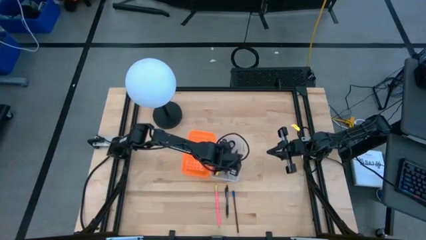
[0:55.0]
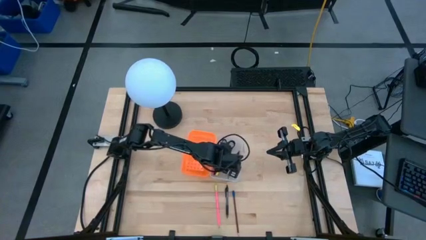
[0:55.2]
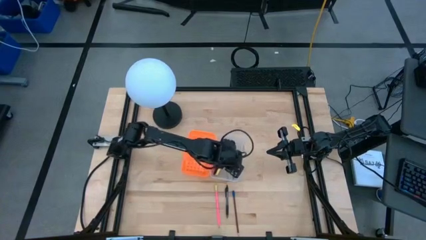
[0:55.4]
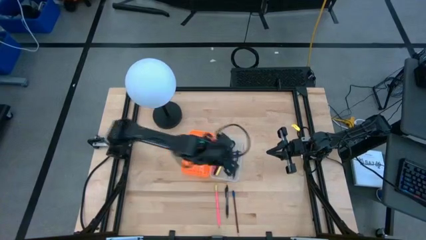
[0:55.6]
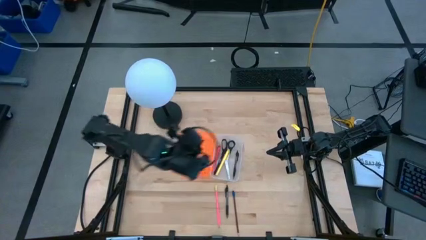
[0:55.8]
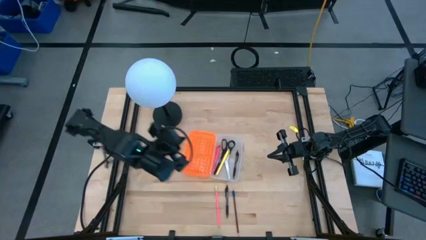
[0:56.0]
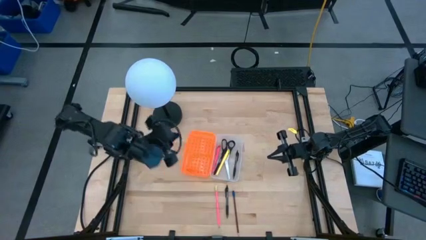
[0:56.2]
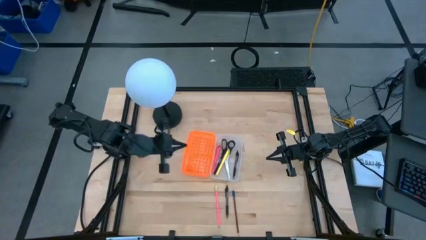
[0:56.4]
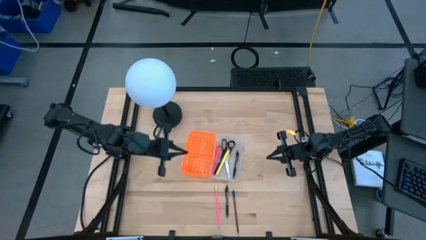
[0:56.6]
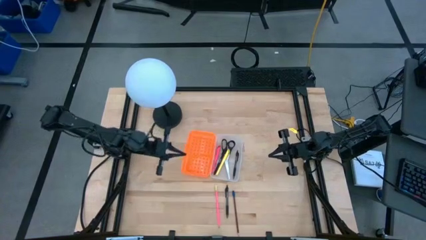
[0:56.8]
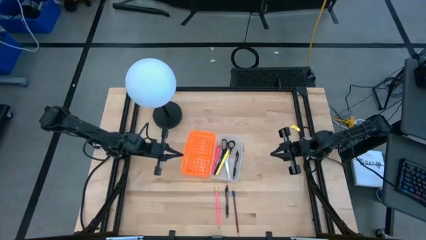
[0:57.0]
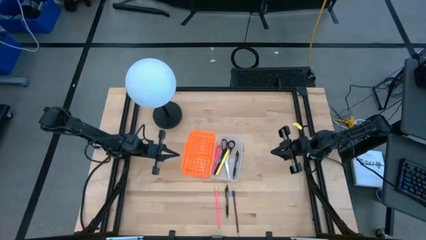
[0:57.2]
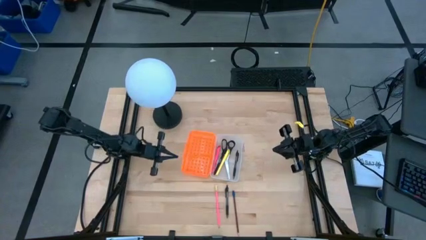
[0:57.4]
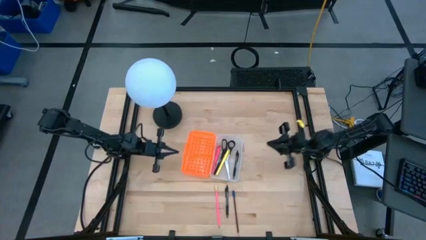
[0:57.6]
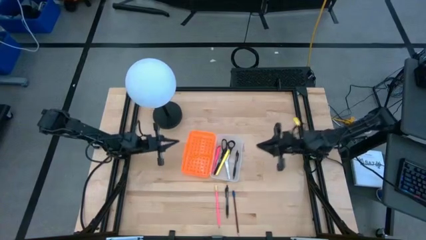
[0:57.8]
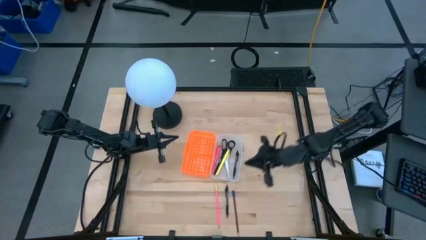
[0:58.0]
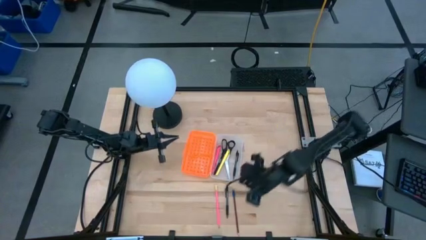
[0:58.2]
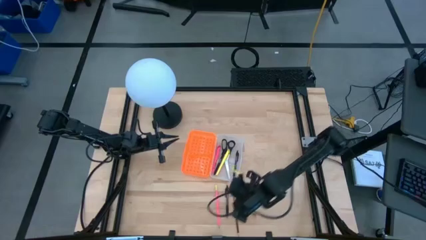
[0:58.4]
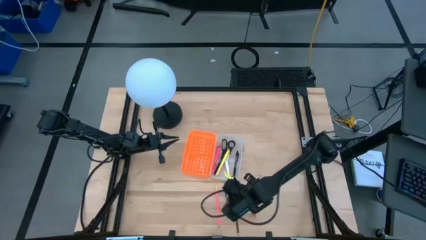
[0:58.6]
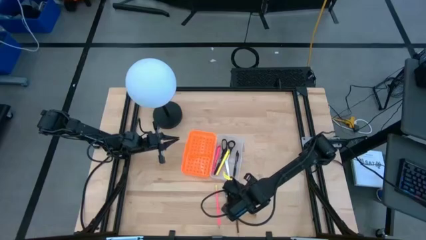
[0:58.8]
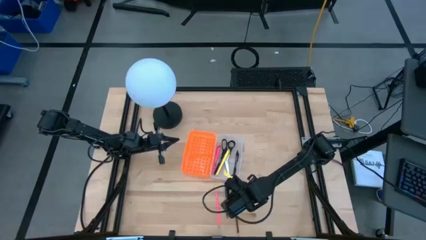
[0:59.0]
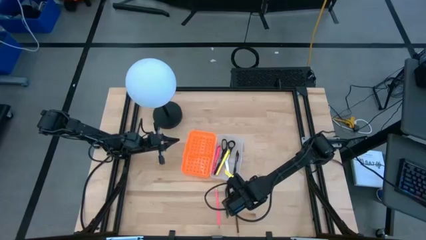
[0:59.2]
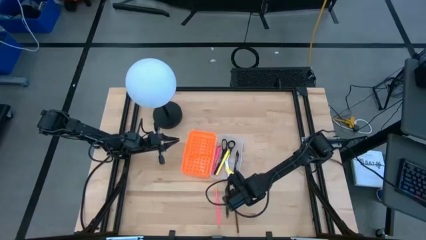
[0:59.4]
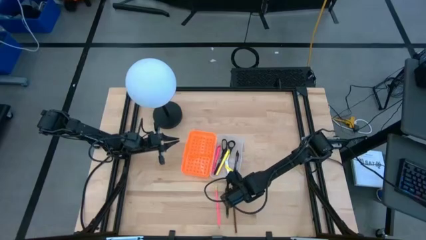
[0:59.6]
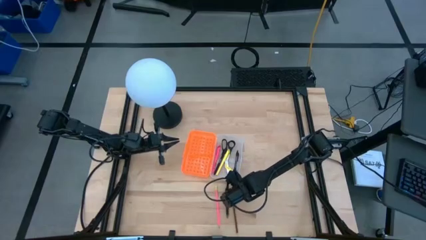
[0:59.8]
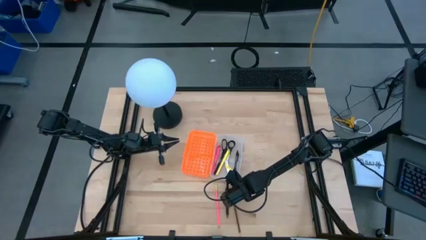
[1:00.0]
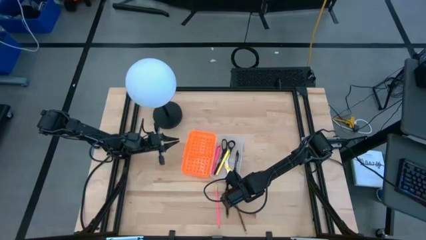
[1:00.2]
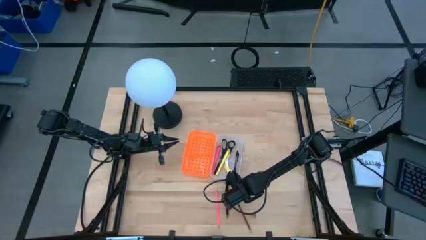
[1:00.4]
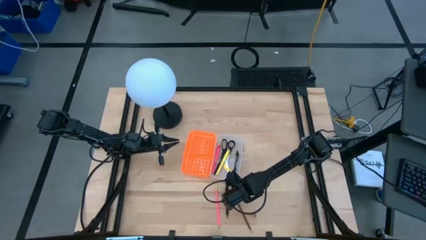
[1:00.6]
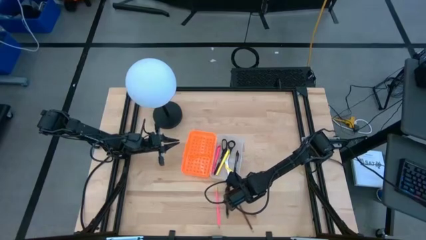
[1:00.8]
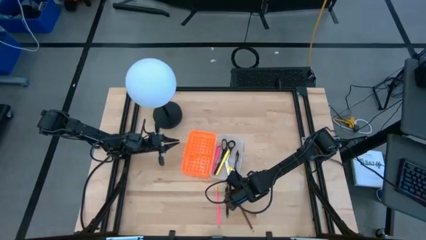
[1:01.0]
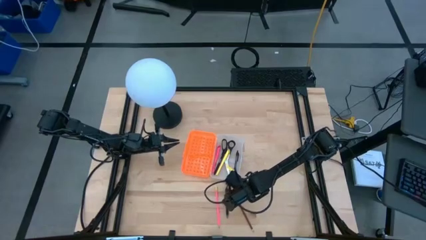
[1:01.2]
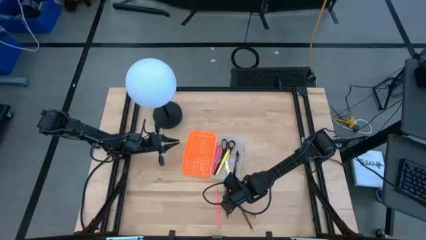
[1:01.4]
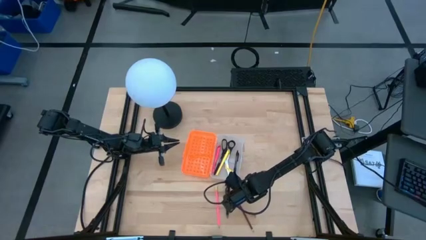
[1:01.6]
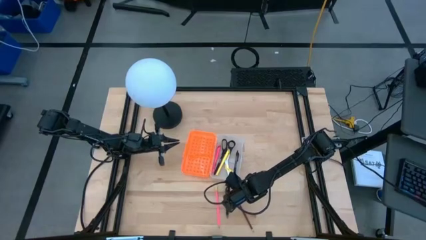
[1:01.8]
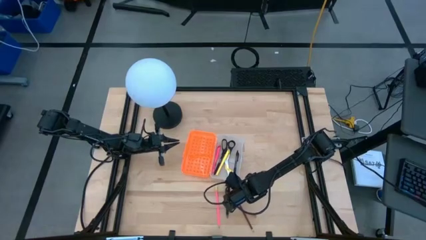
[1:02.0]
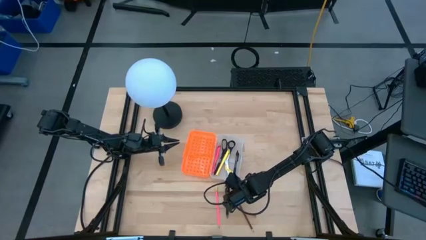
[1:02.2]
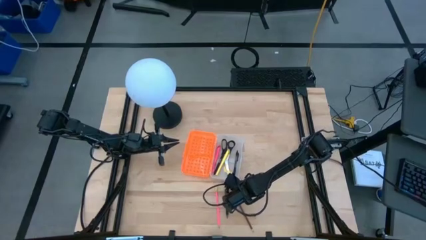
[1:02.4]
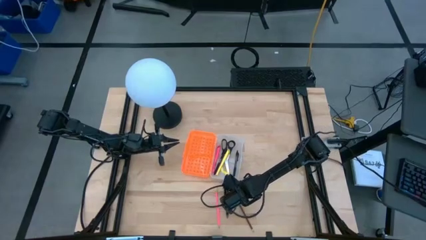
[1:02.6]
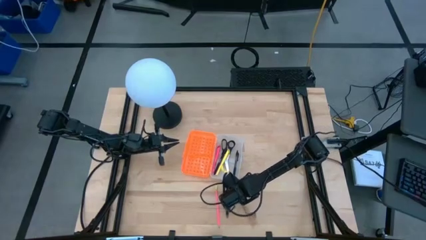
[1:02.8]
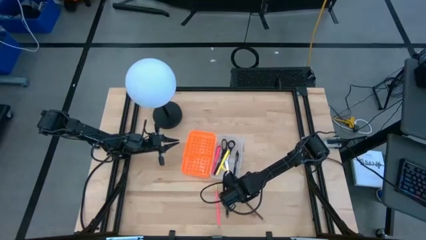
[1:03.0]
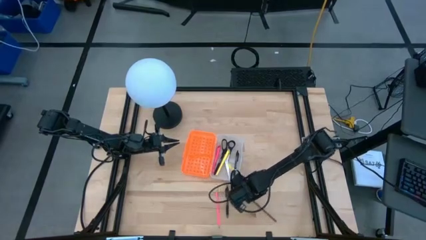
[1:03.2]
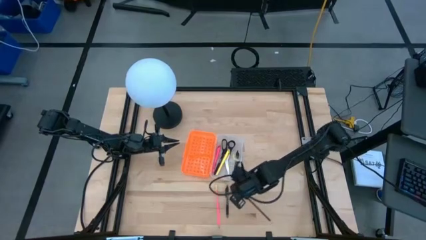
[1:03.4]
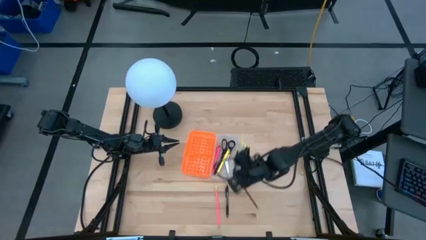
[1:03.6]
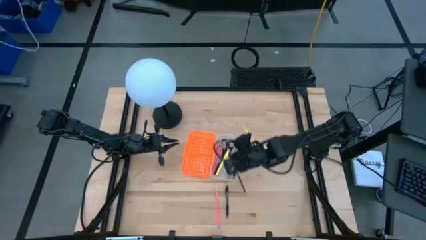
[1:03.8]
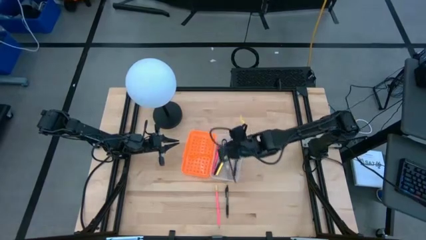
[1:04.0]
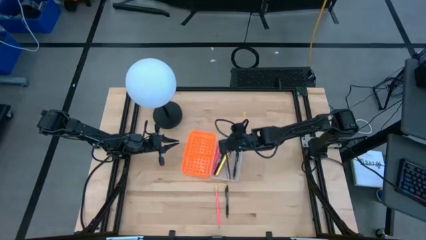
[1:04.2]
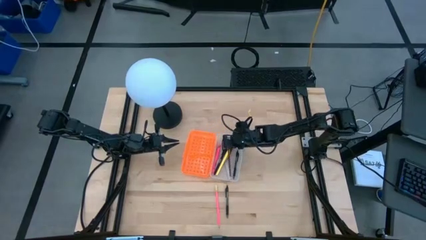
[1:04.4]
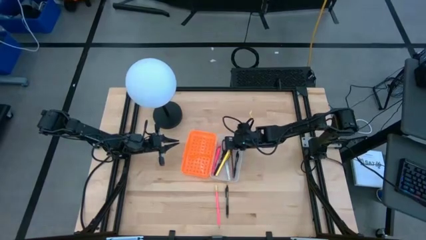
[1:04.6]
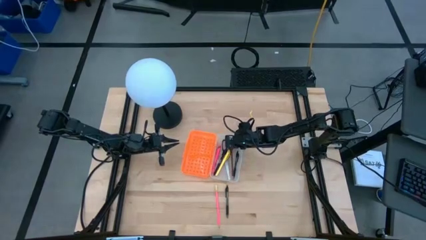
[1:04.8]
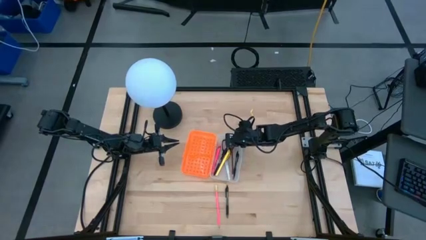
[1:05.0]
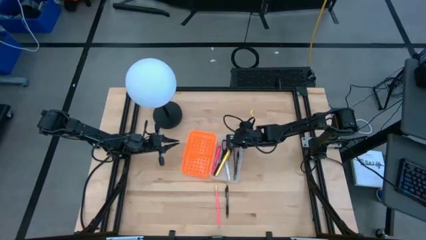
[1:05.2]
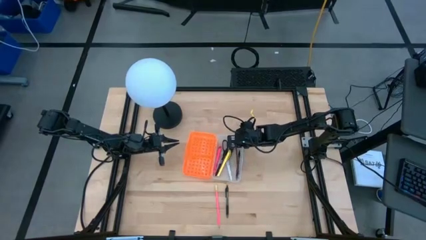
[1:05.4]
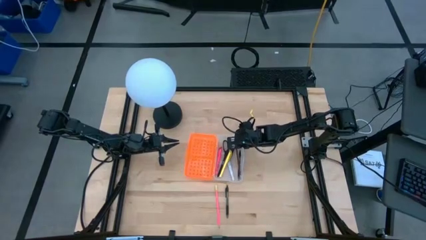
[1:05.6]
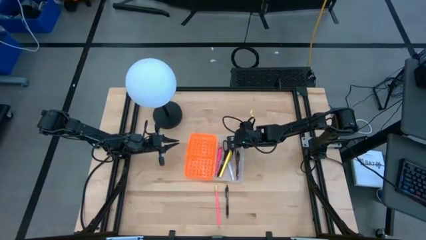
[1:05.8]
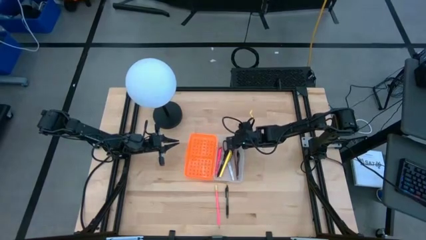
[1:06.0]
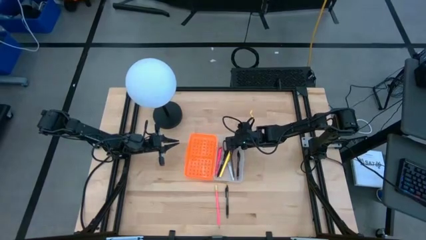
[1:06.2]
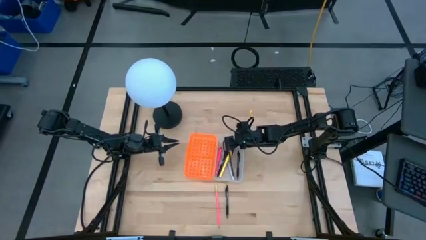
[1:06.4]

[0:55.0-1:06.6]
Task: Pick & place school supplies into a supply box
Put the brown pencil into the orange supply box

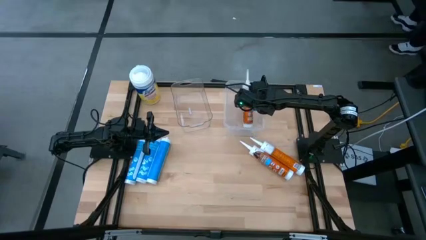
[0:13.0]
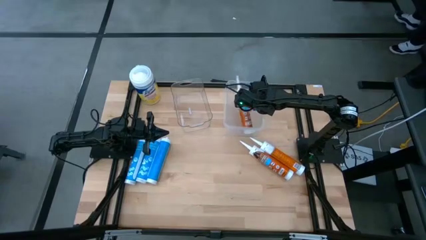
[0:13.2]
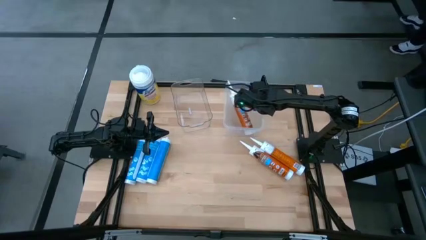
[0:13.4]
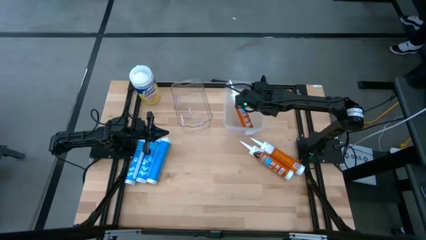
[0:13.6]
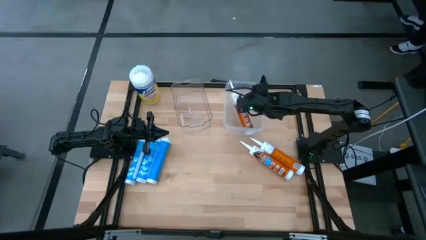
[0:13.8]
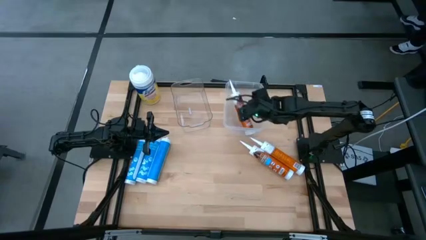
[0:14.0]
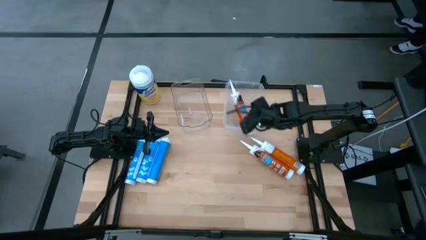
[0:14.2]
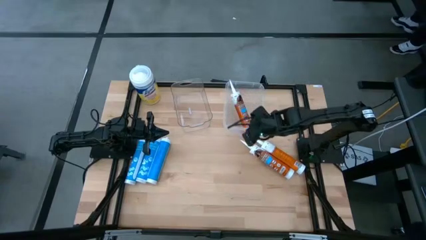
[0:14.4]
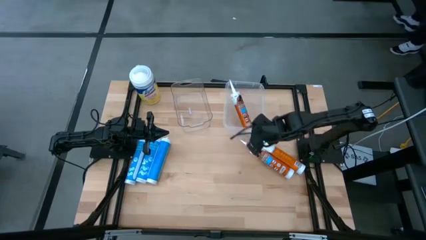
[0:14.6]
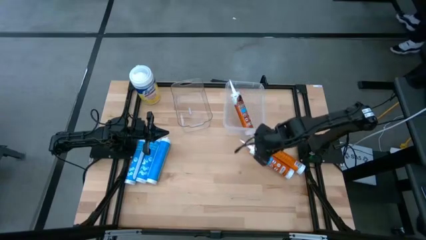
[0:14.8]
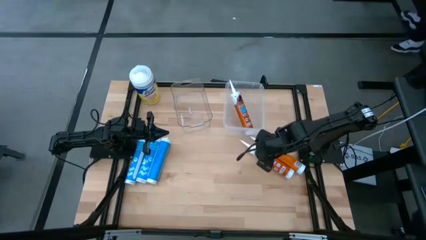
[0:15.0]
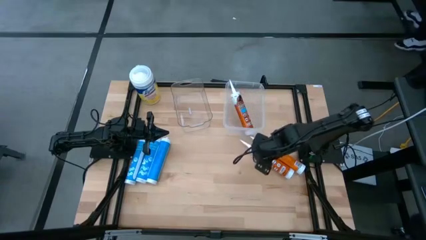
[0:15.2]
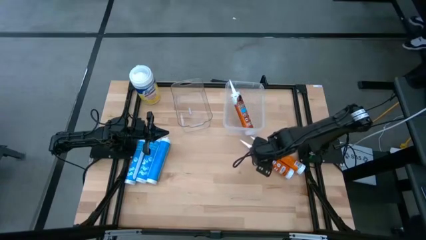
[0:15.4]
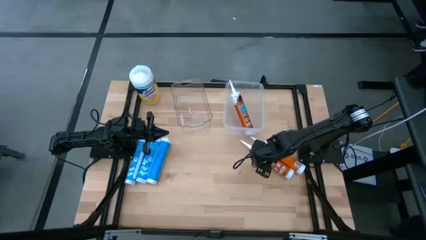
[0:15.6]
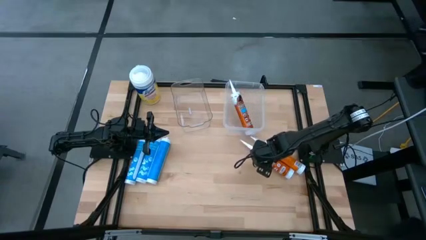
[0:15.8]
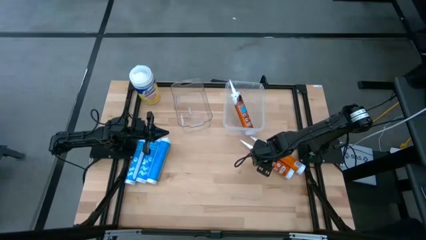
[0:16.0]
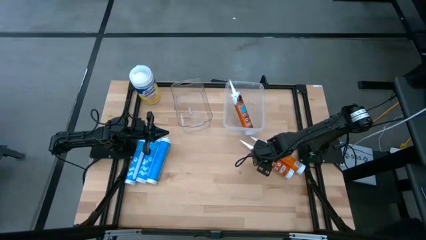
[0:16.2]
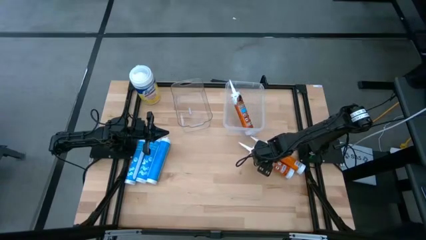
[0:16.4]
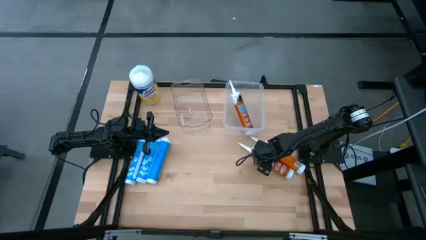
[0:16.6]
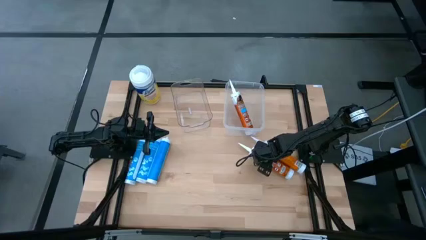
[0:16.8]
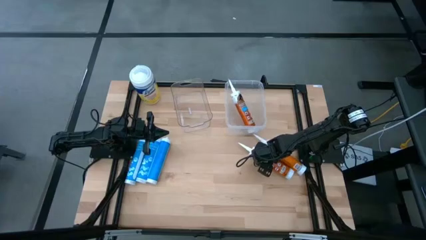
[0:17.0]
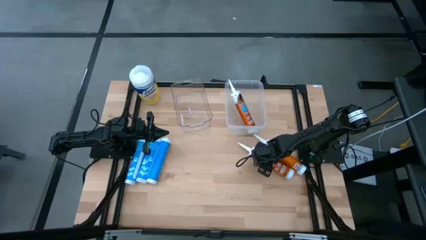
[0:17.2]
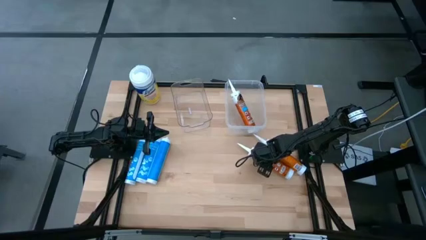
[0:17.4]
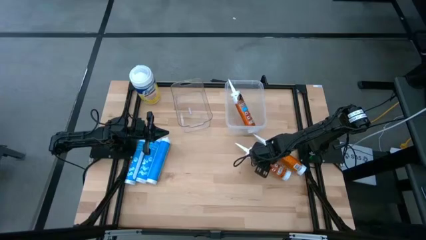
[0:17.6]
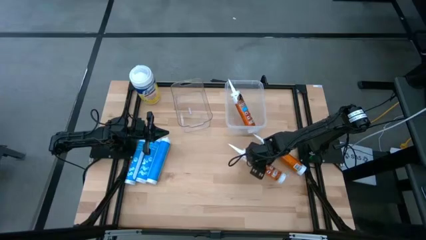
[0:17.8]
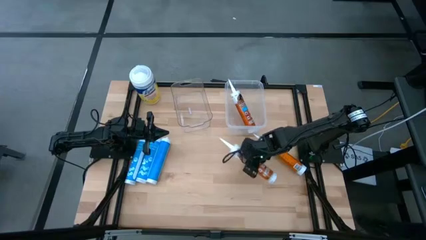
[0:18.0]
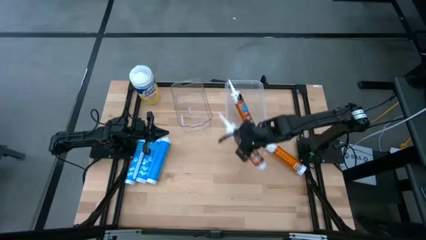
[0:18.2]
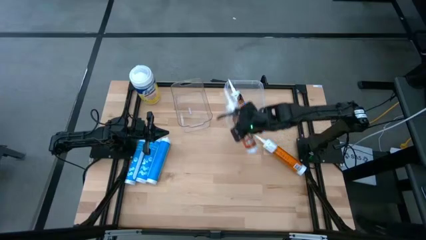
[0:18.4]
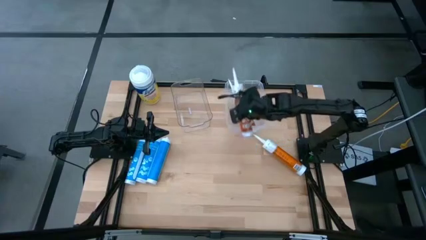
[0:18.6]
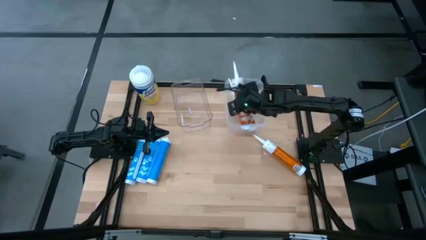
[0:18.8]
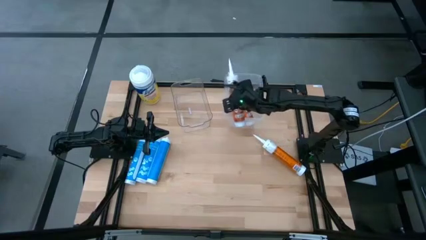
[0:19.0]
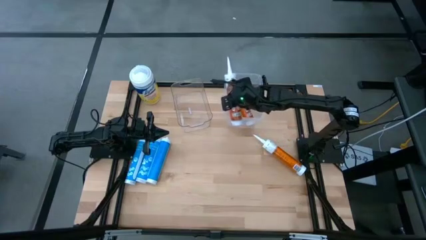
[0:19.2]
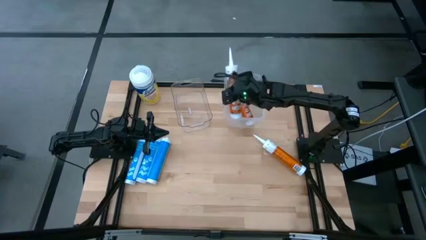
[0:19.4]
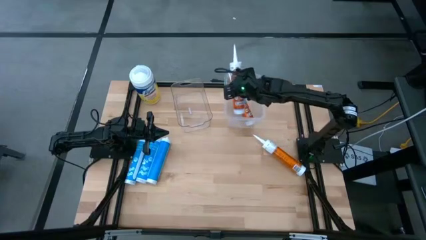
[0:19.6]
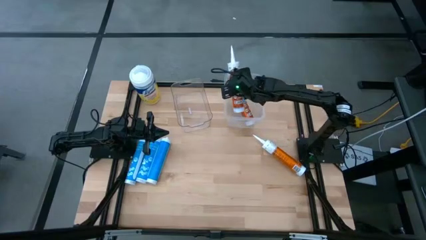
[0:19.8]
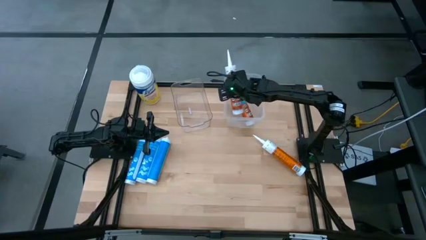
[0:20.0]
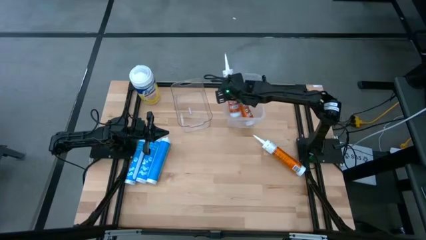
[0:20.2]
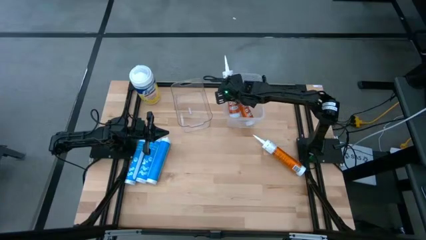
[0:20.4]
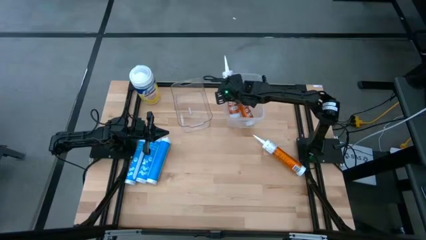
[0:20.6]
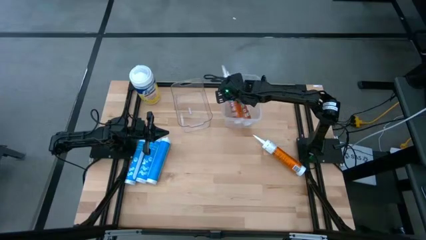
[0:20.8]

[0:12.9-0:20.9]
Task: Pick & place silicon tubes, Sealant and Lysol wipes
Put the right orange sealant into the right transparent bin
